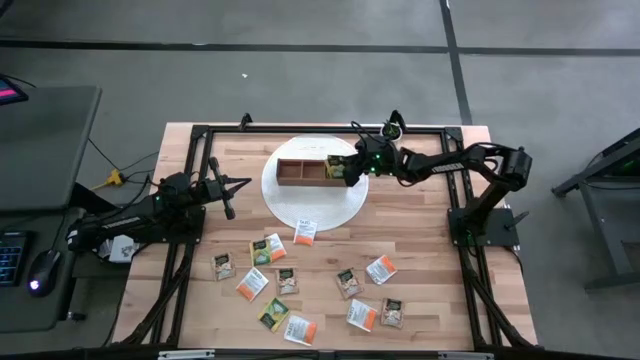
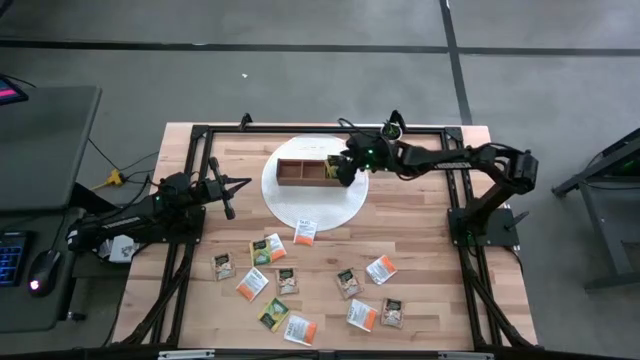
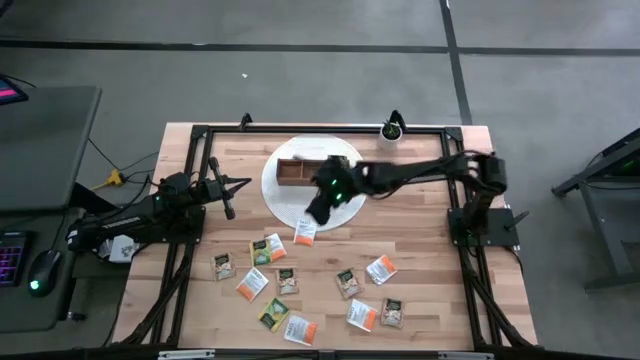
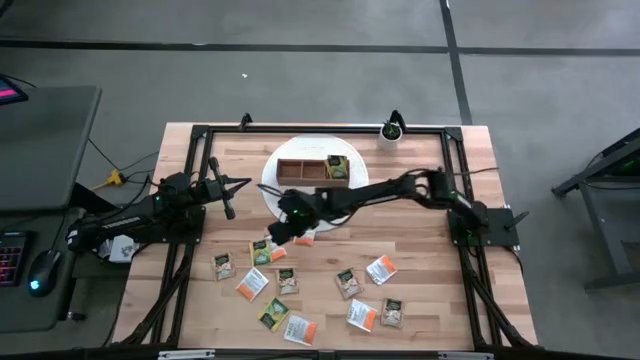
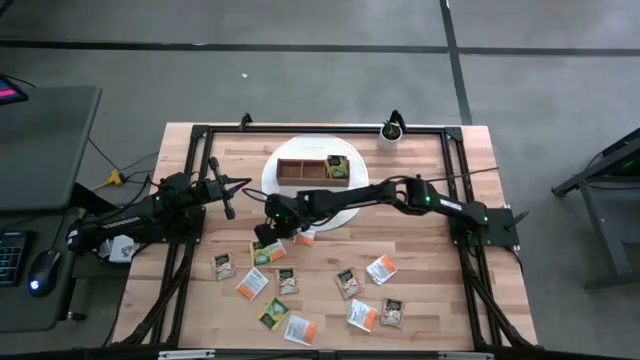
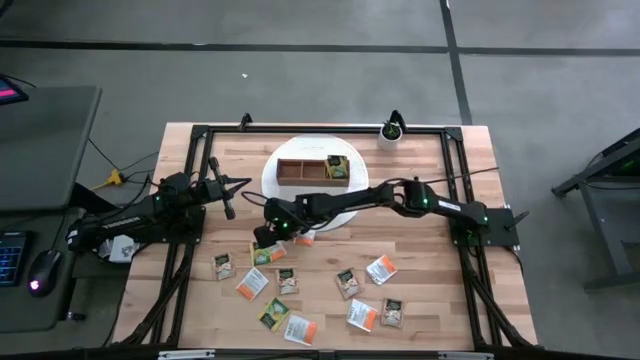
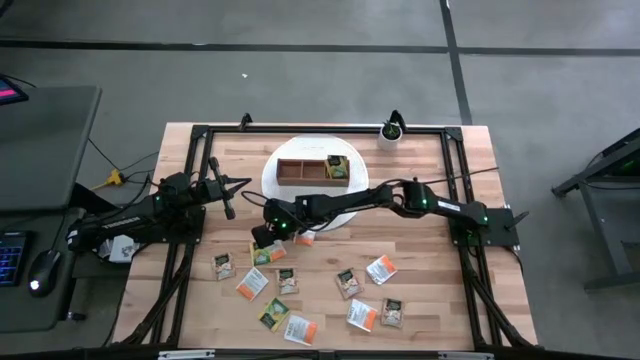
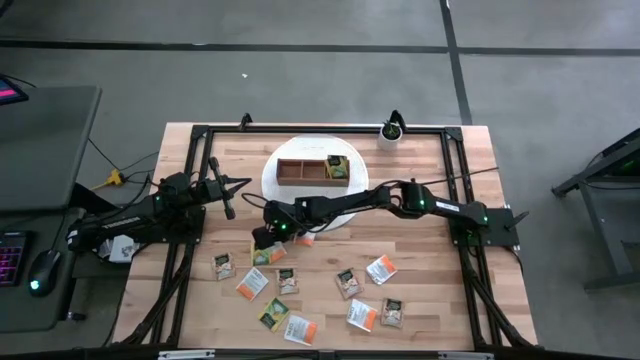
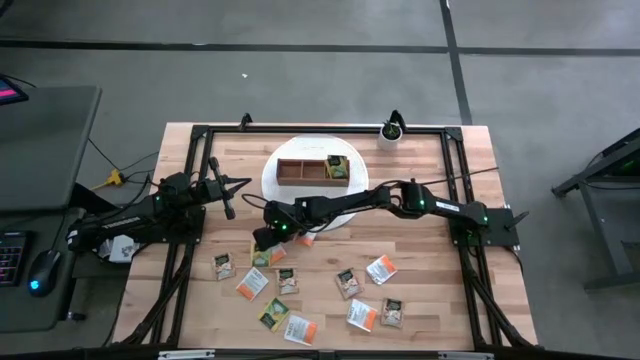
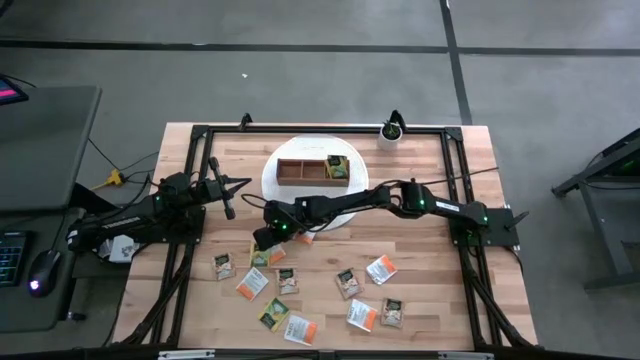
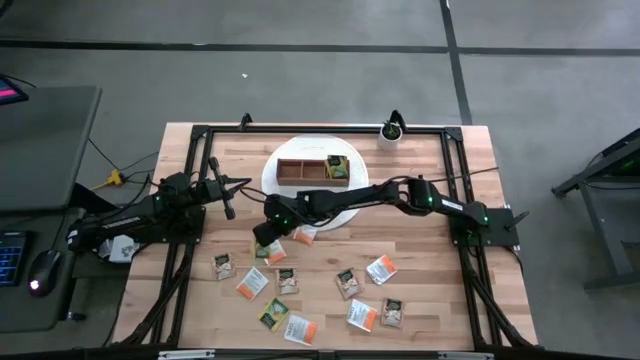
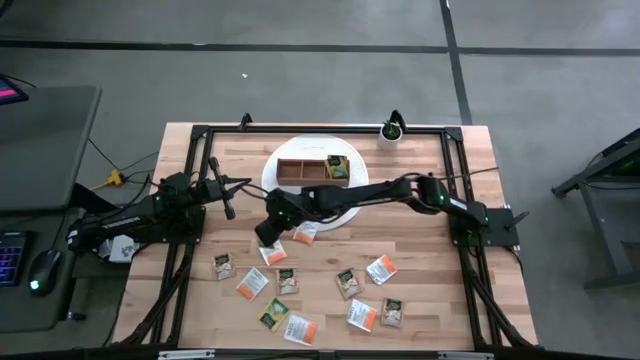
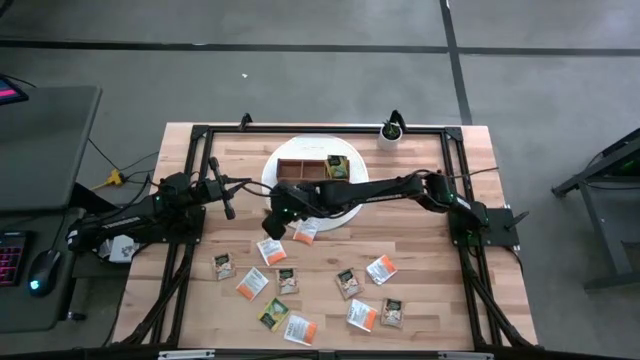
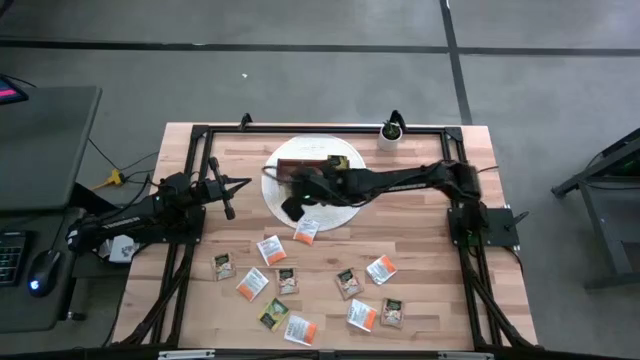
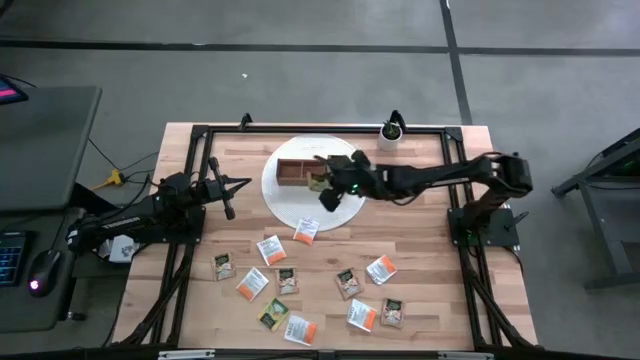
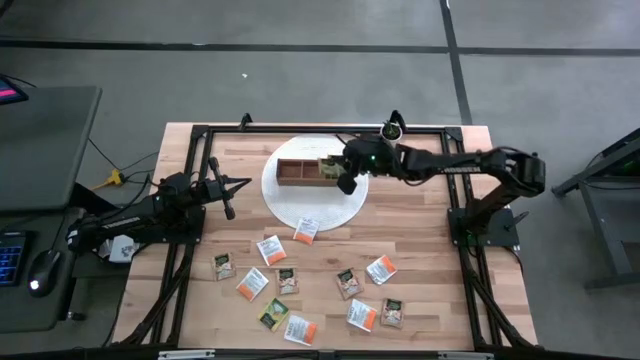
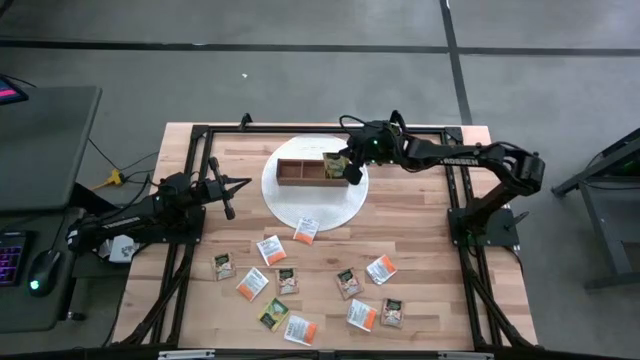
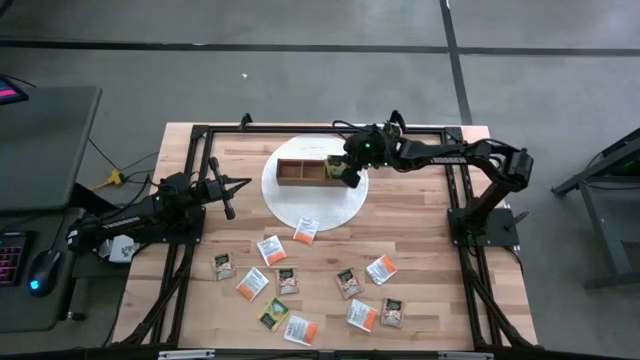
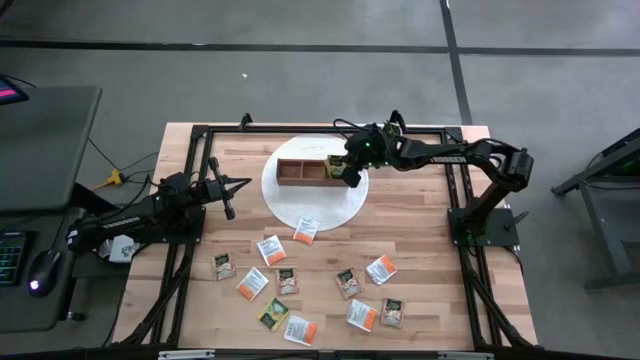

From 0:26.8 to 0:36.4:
Task: Pick & Place Tea
Put the green tea bag into the right section of the wooden organizer

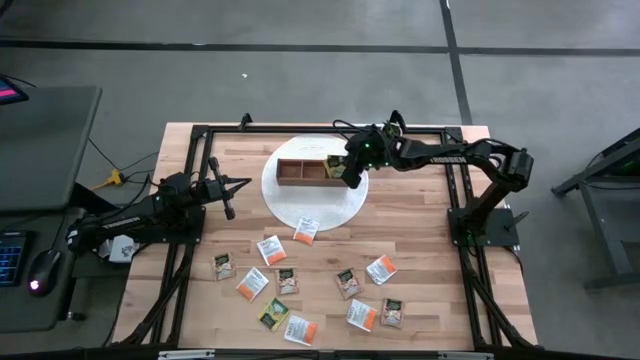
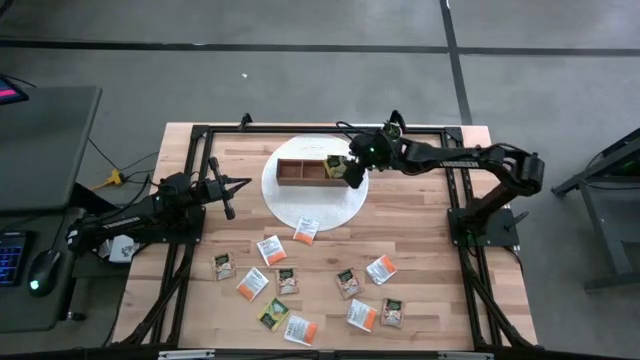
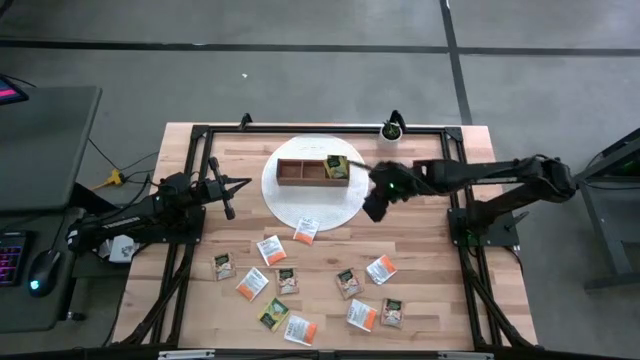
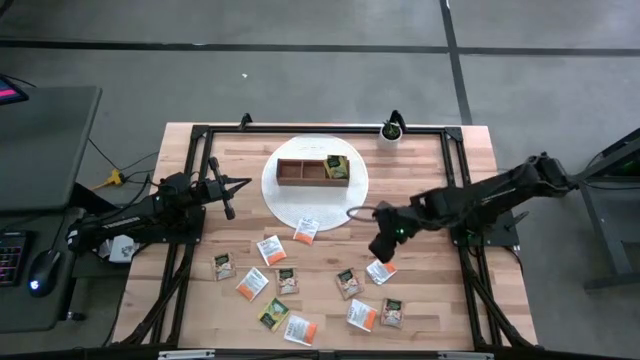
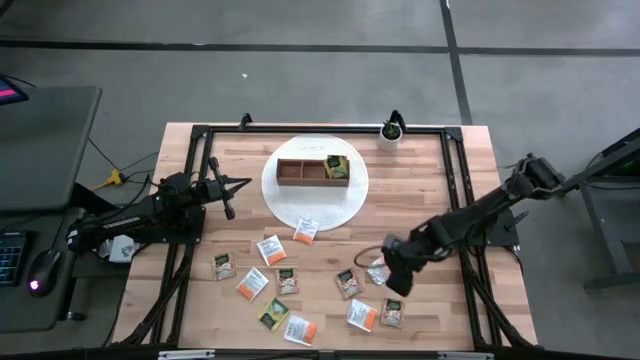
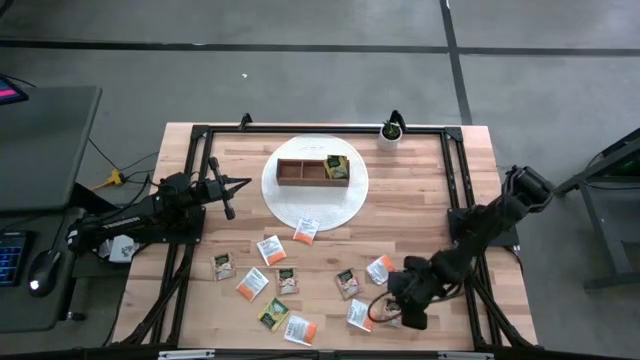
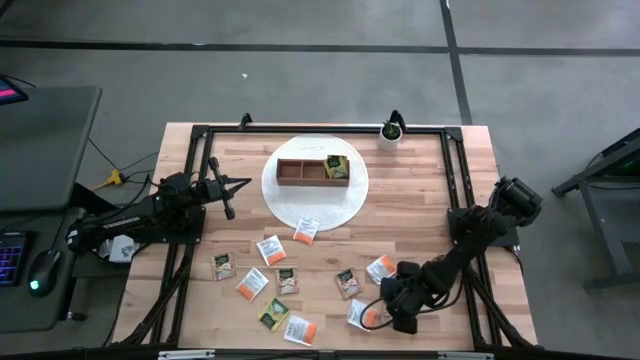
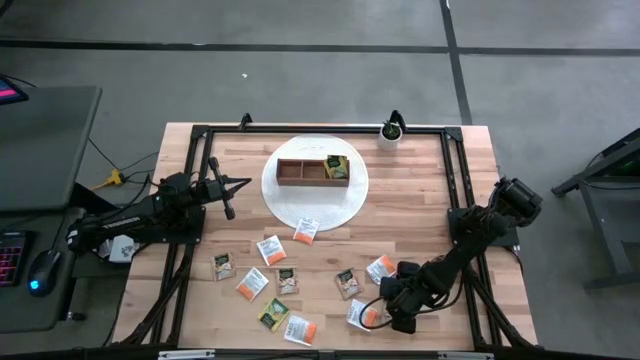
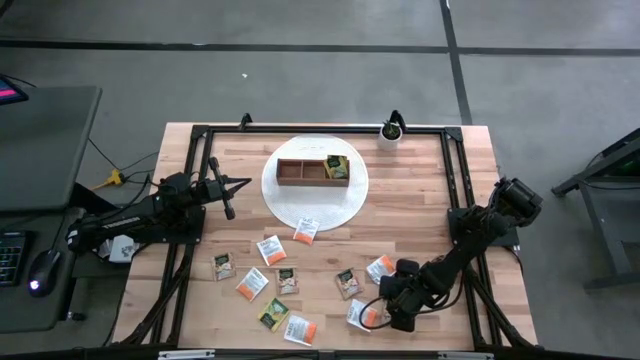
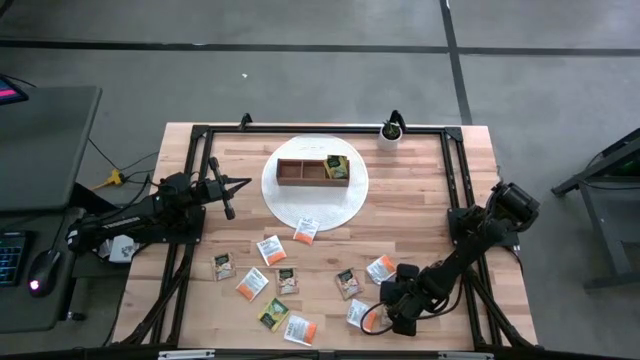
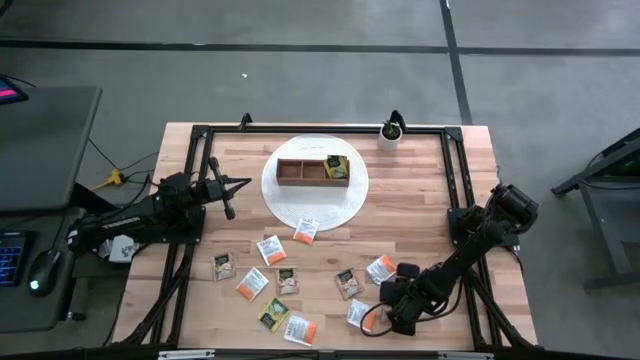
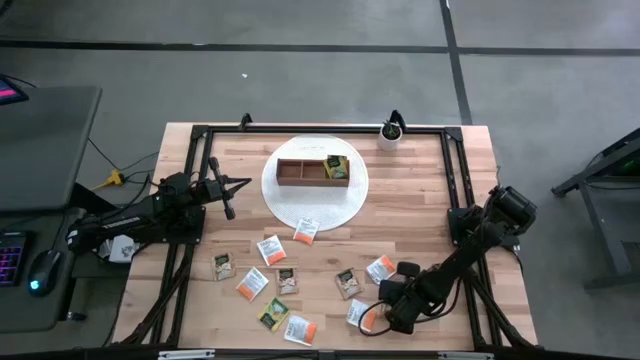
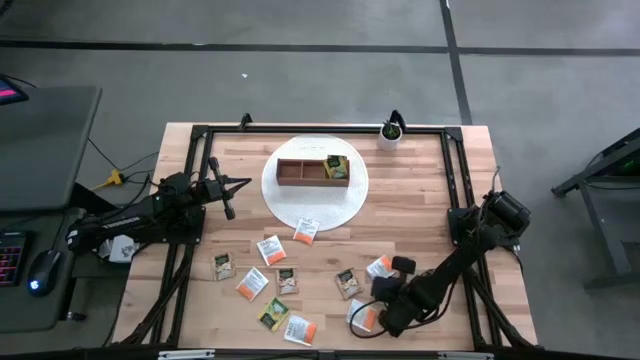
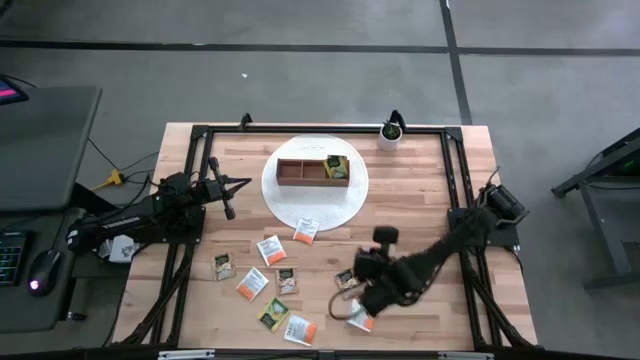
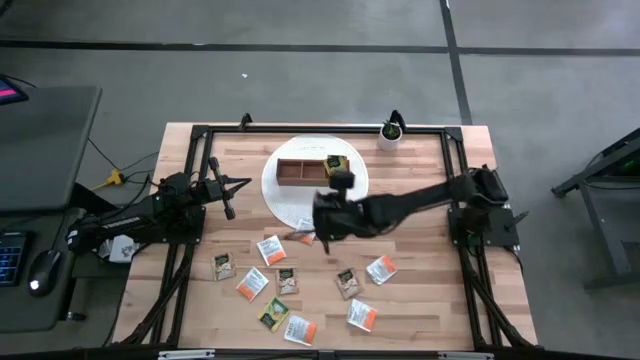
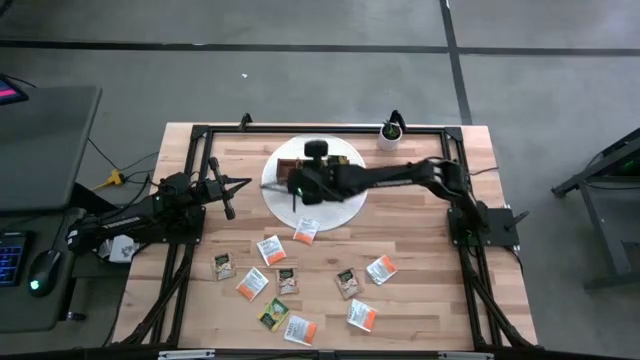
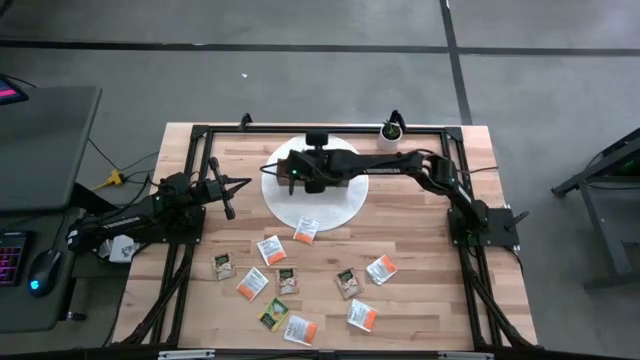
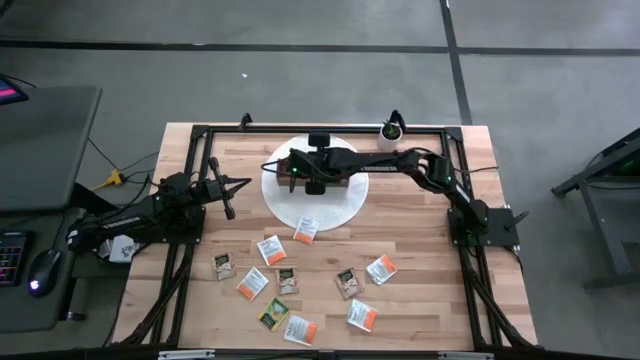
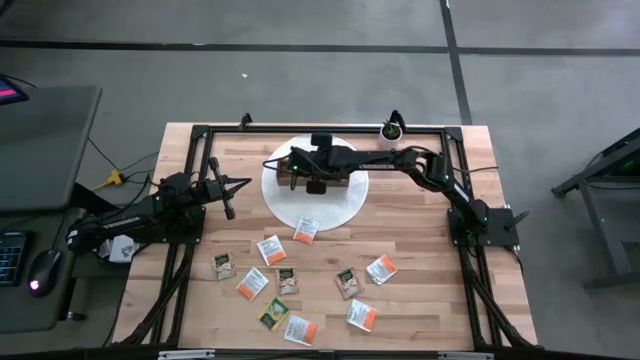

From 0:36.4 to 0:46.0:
Put the brown tea bag into the middle section of the wooden organizer

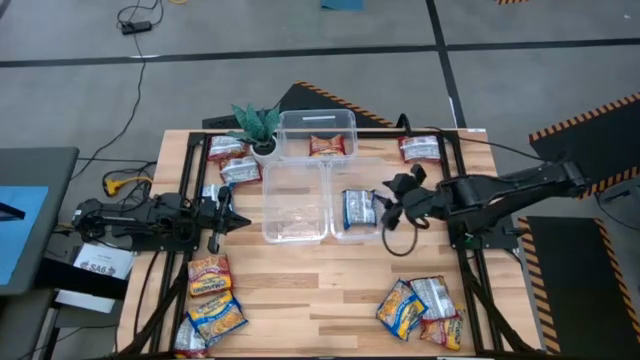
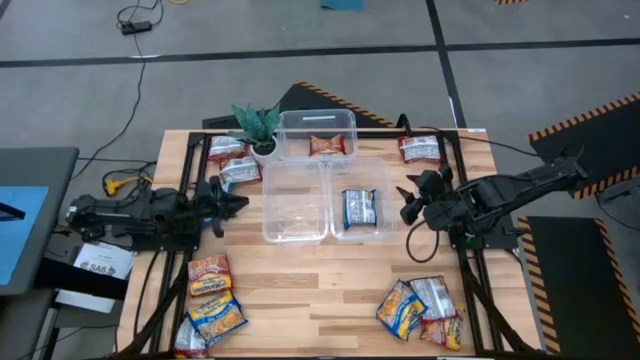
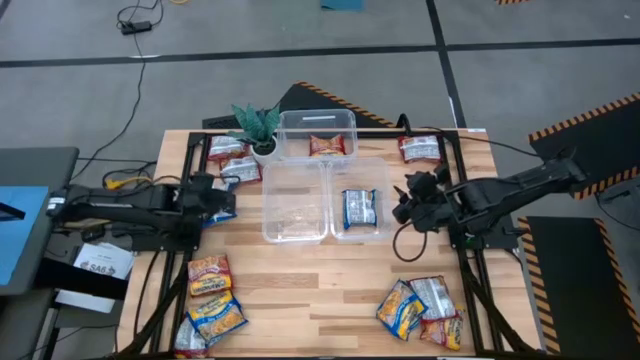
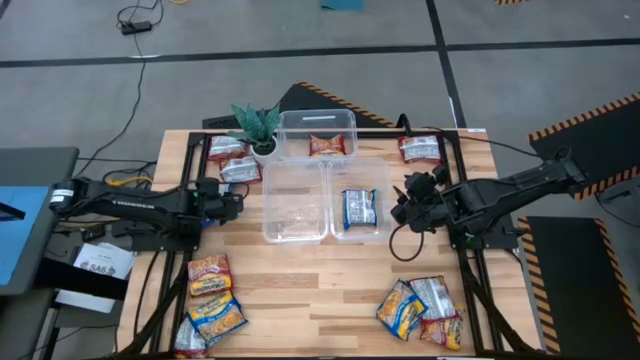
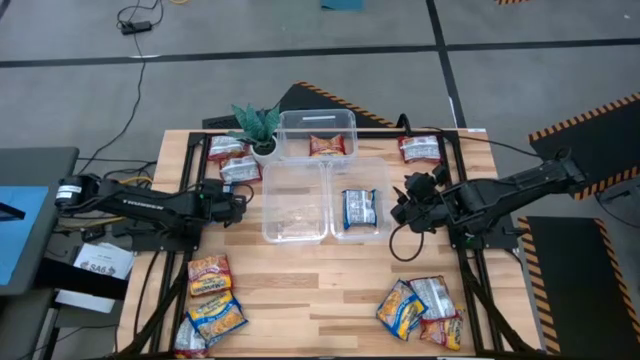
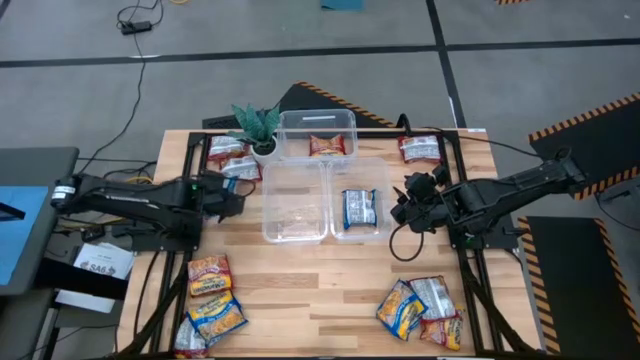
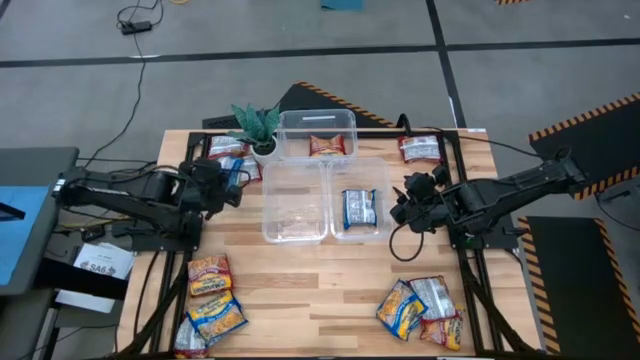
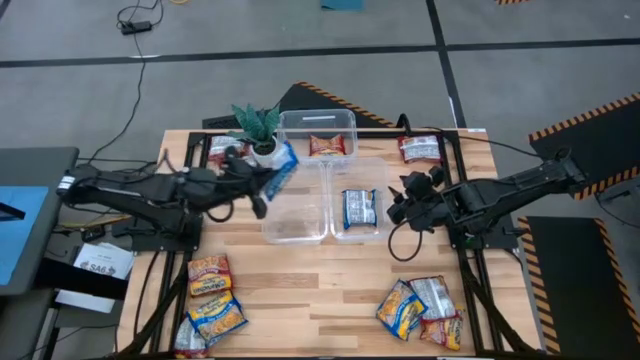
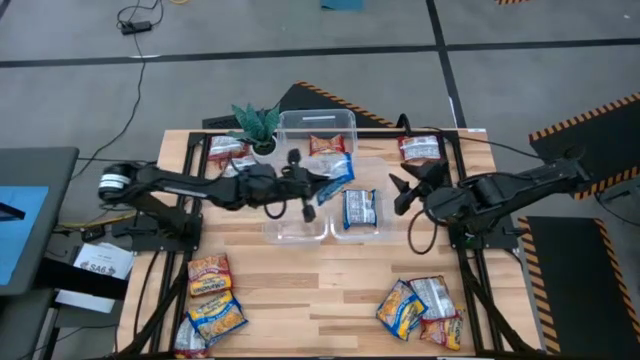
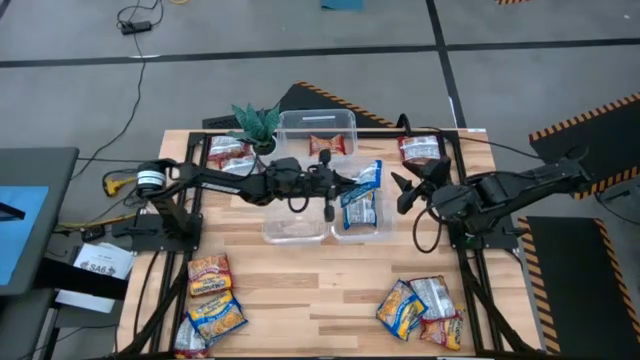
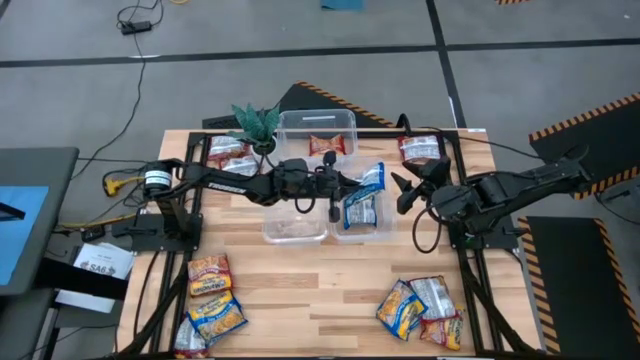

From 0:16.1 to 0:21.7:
Task: Sort Maruchan noodles
Put the blue noodle pack into the bottom right transparent bin
